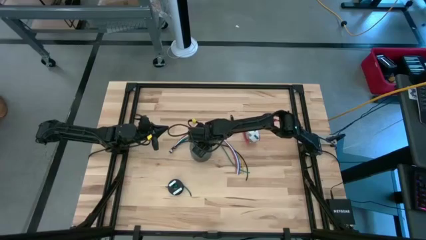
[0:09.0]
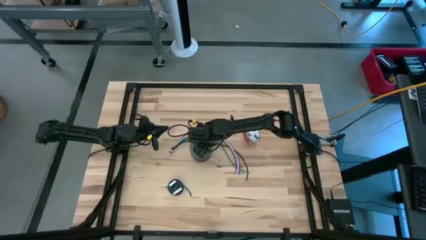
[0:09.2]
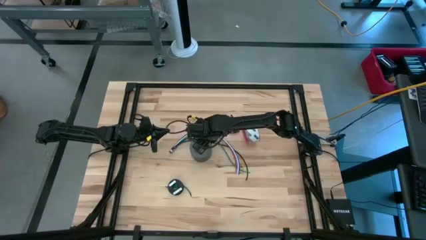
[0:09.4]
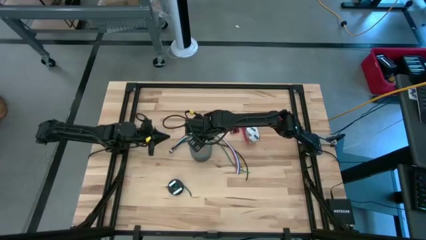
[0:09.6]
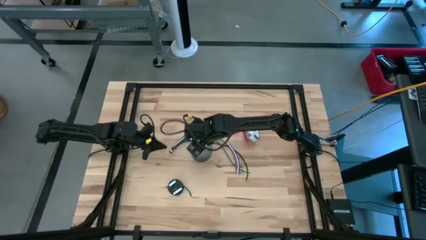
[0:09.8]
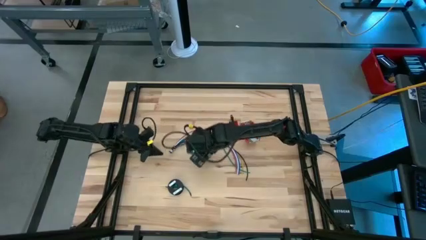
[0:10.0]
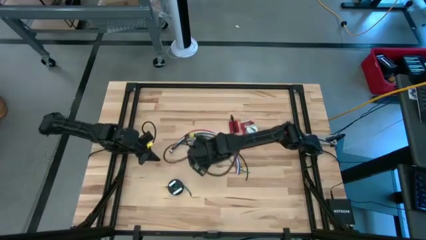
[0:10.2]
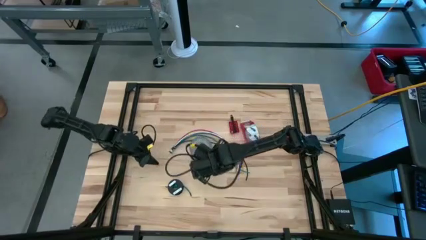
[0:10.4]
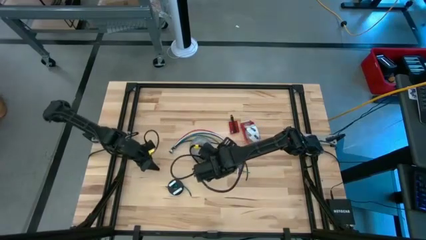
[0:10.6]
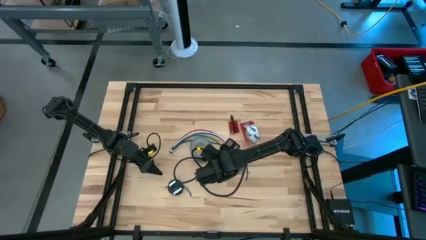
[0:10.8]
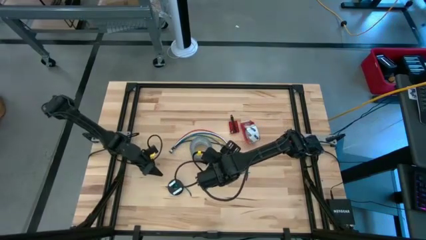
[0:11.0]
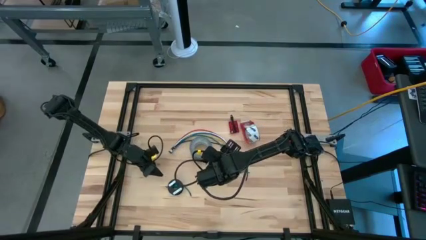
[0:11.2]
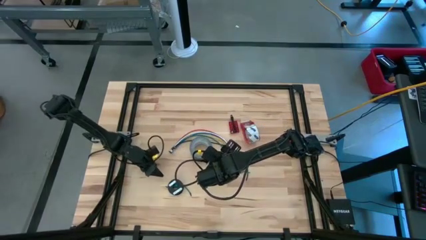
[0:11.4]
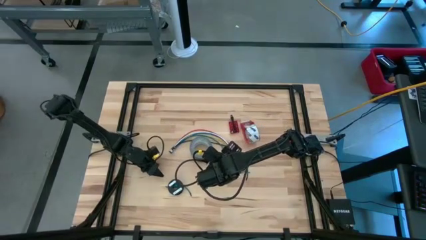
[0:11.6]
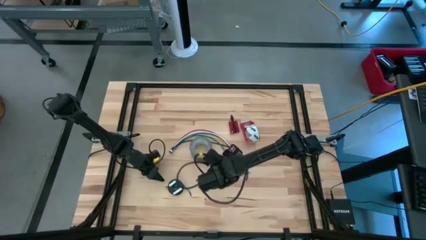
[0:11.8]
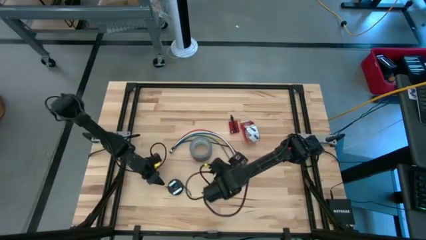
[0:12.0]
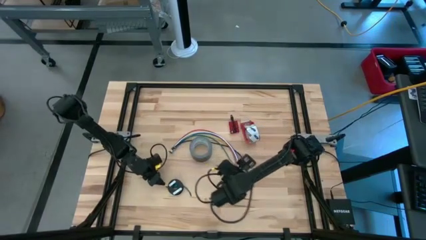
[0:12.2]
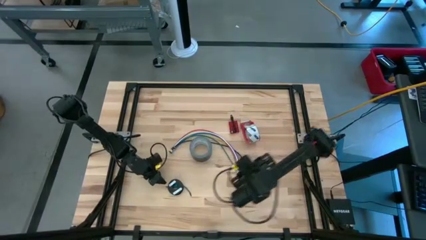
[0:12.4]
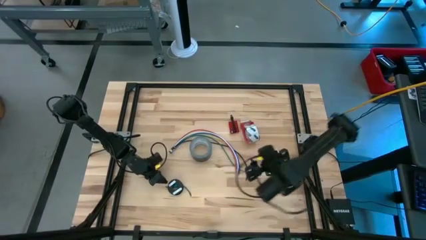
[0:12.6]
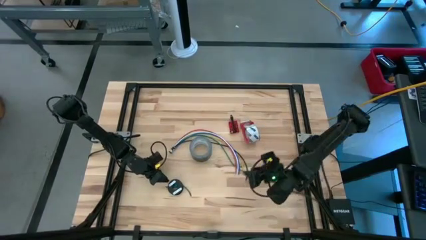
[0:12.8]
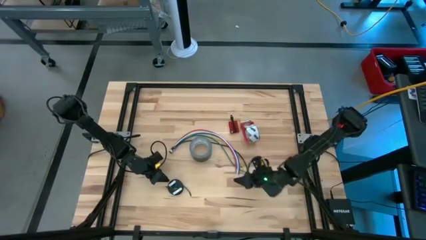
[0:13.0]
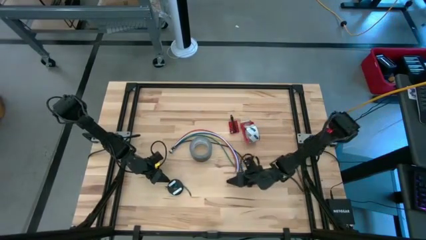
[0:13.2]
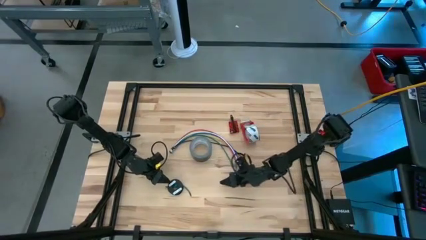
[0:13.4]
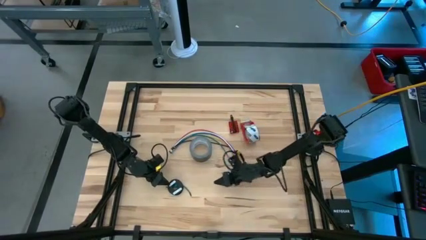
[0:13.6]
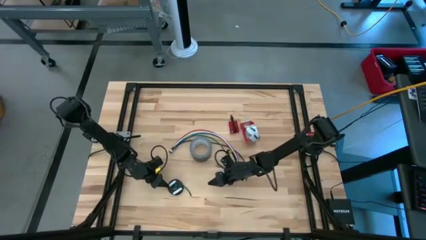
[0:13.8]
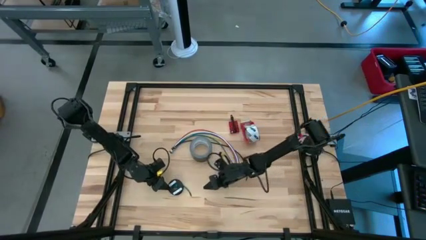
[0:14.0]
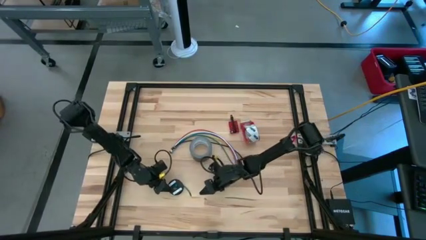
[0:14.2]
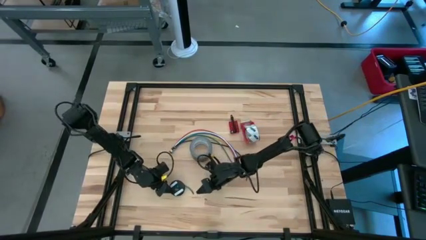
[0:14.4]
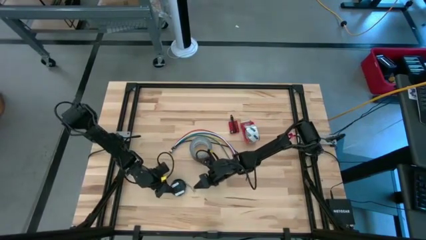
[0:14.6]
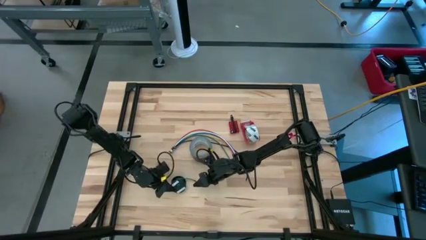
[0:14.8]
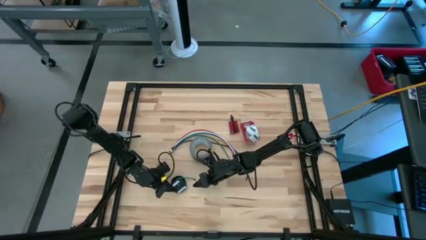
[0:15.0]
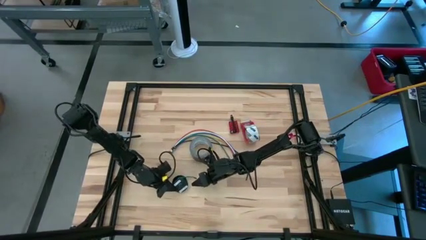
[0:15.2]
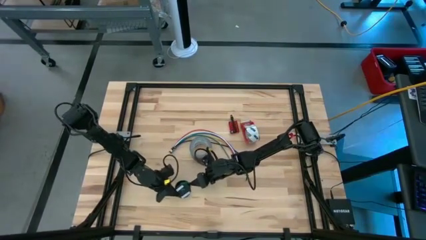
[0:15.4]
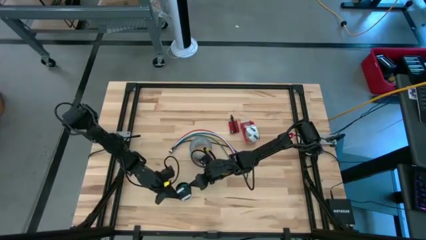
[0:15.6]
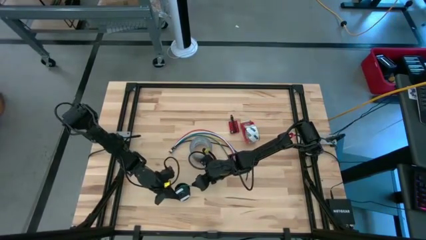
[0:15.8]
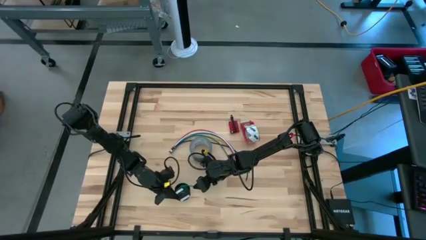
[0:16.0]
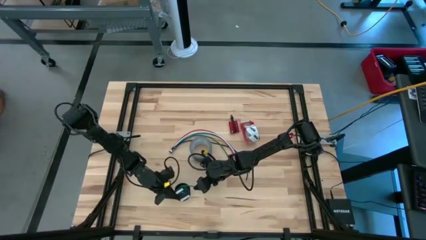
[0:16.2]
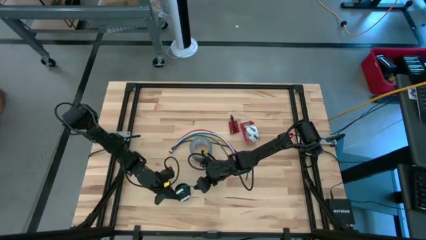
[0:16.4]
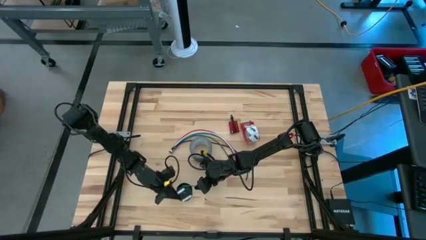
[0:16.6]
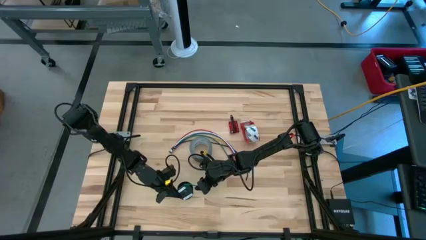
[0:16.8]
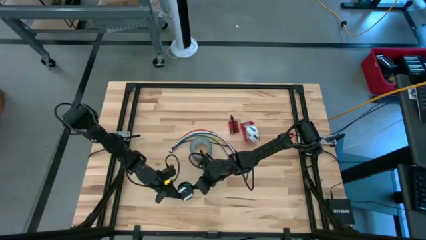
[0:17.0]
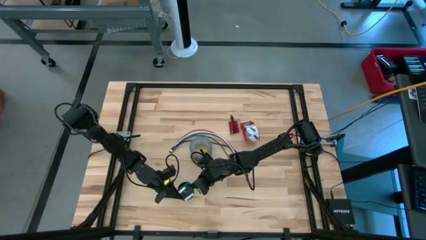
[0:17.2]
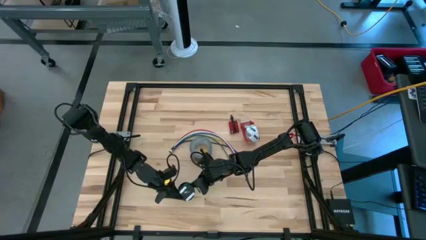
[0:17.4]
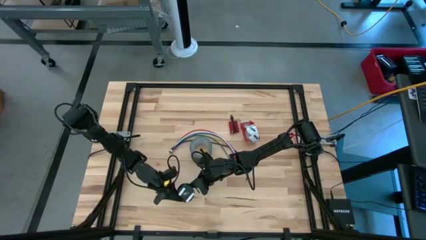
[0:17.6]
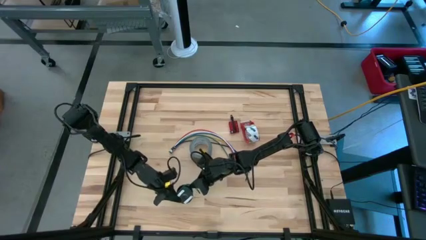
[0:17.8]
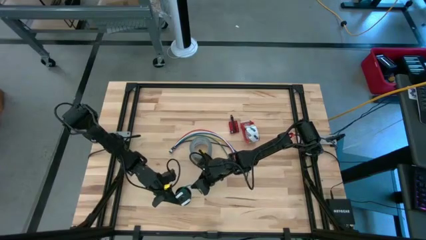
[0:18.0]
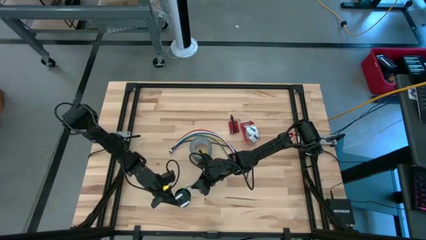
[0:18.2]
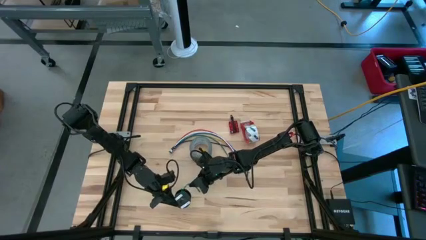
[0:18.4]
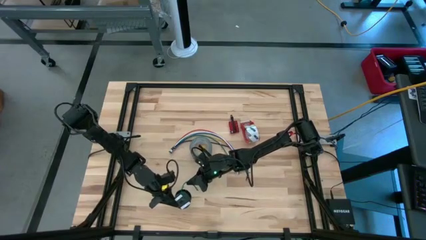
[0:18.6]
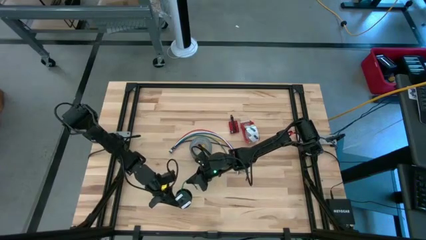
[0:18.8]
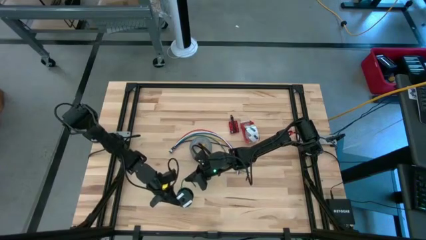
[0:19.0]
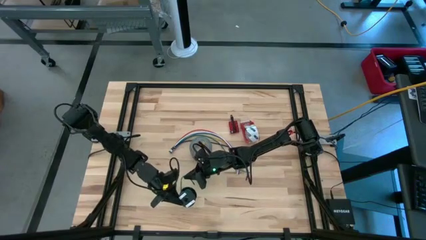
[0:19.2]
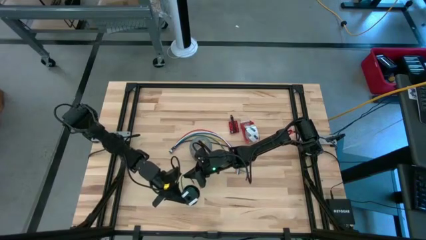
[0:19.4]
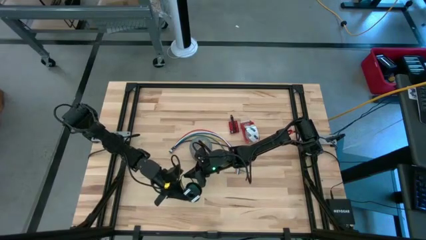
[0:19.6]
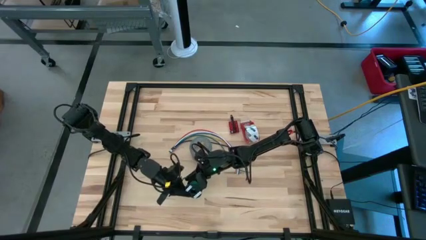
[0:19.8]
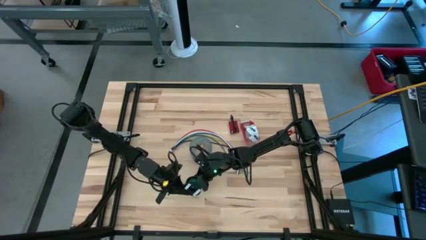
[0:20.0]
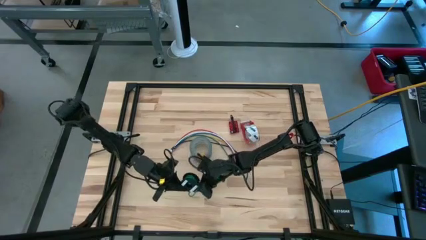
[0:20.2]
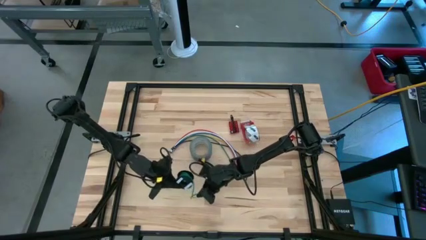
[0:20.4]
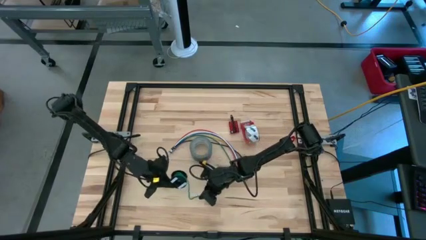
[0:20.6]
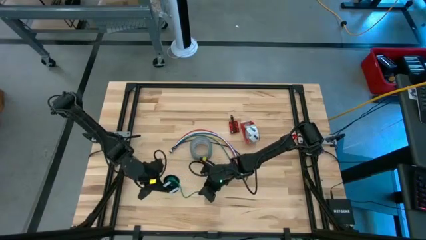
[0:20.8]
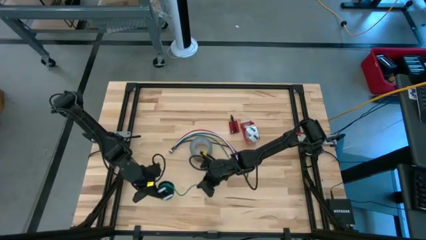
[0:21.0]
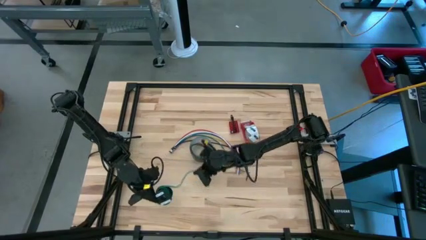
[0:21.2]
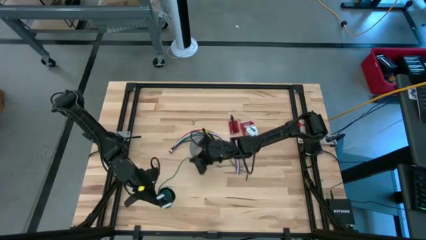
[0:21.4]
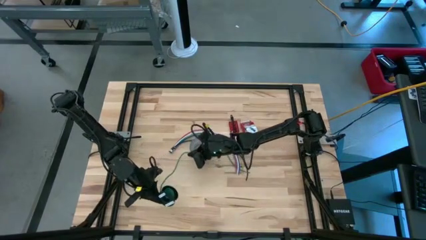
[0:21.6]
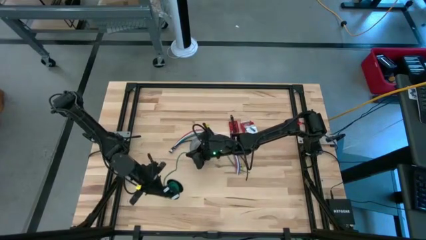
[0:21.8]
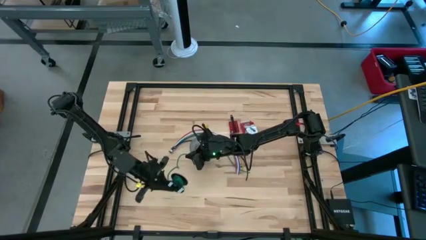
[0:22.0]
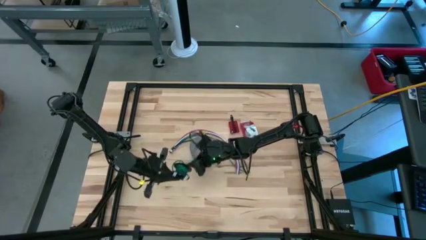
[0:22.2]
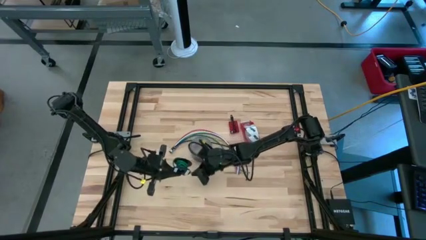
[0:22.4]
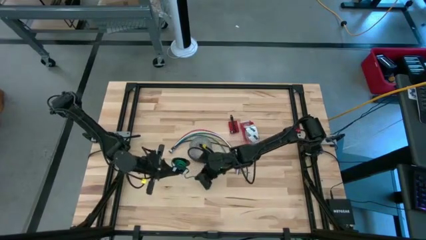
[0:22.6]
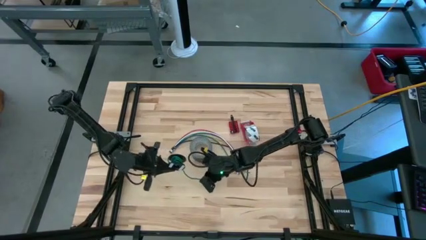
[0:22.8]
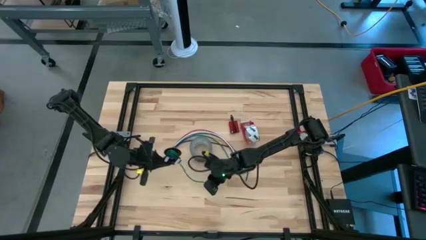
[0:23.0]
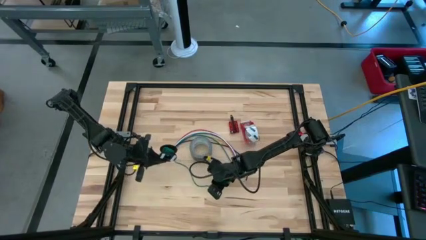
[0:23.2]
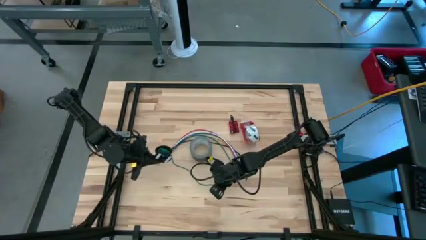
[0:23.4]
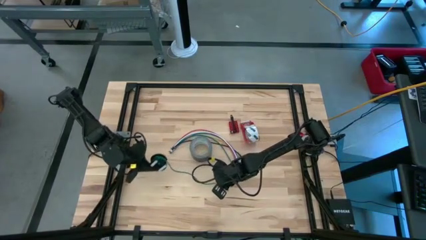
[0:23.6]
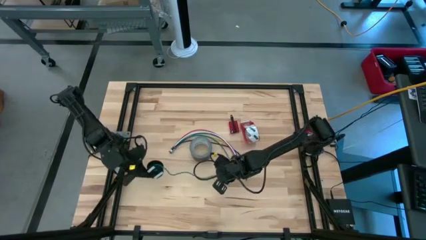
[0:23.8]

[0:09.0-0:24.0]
Task: Coil cords
Uncoil the green wire from the spool
